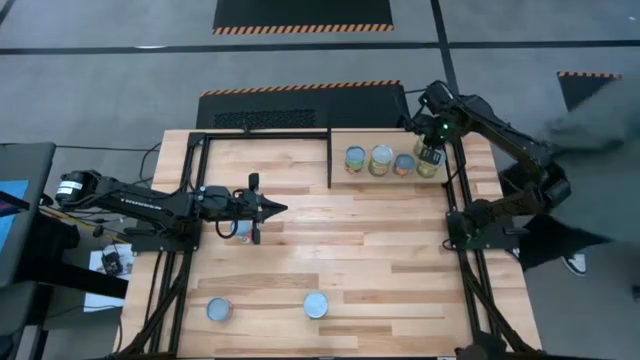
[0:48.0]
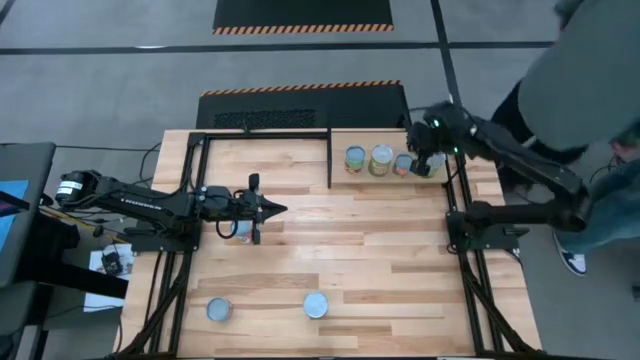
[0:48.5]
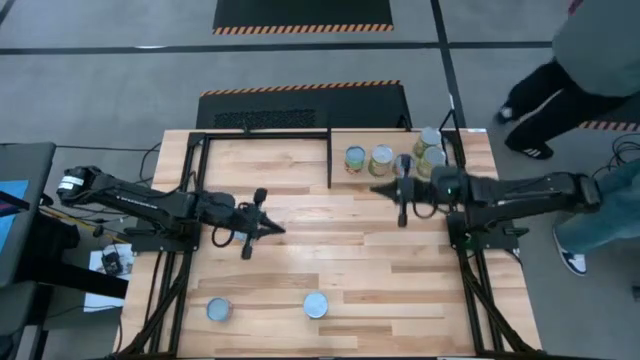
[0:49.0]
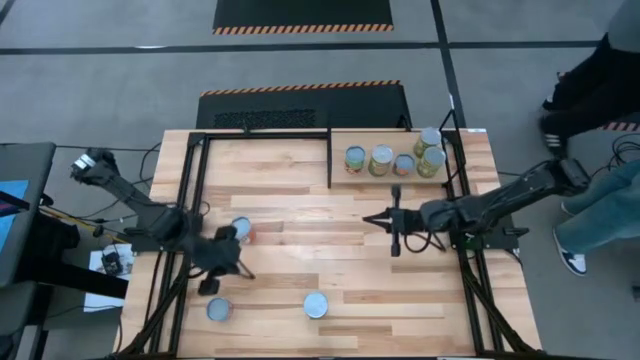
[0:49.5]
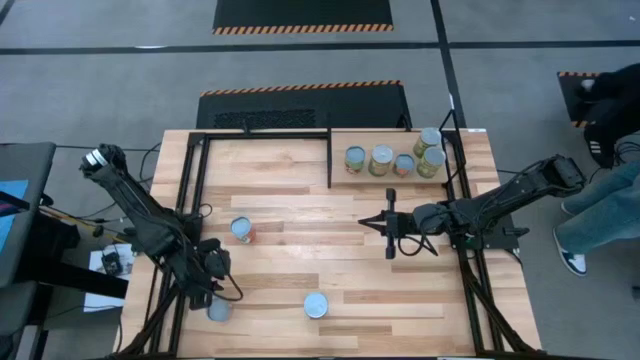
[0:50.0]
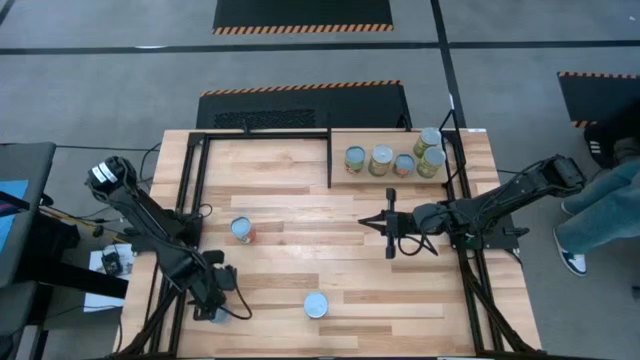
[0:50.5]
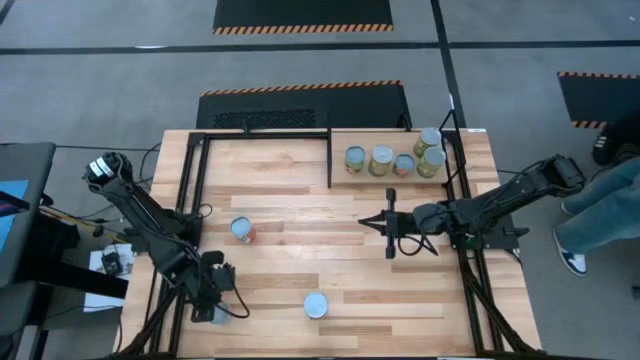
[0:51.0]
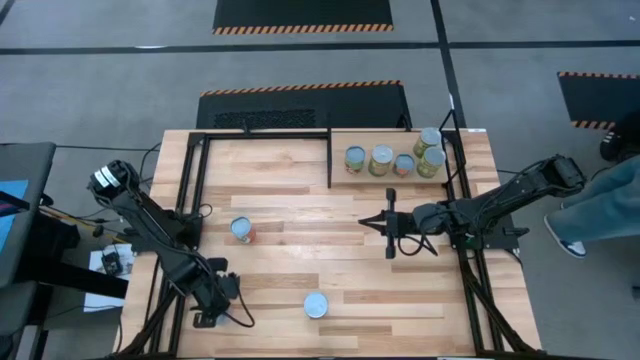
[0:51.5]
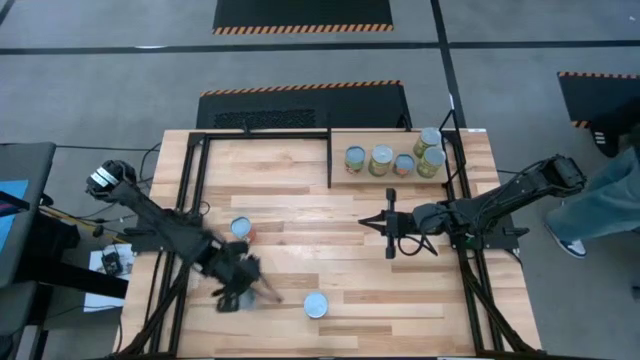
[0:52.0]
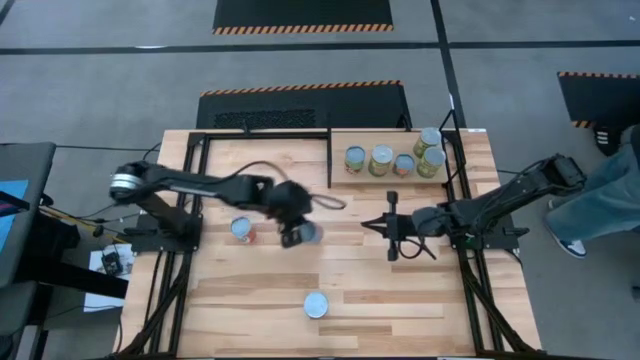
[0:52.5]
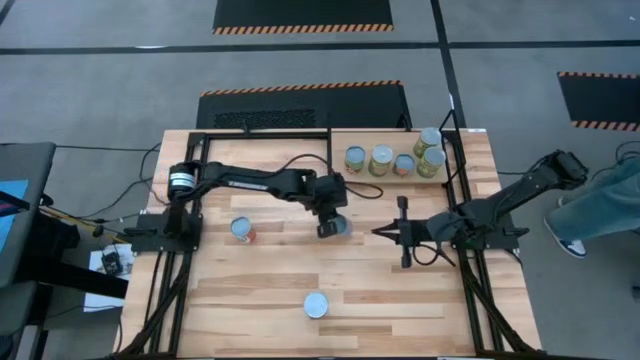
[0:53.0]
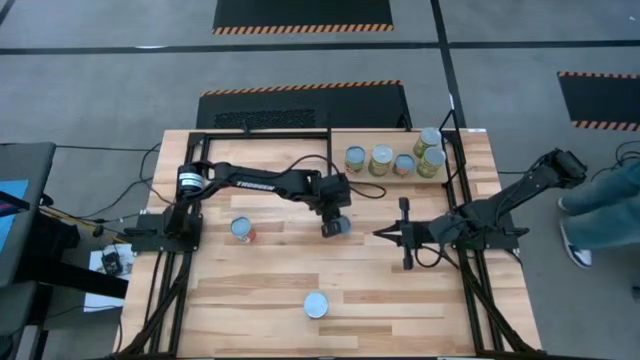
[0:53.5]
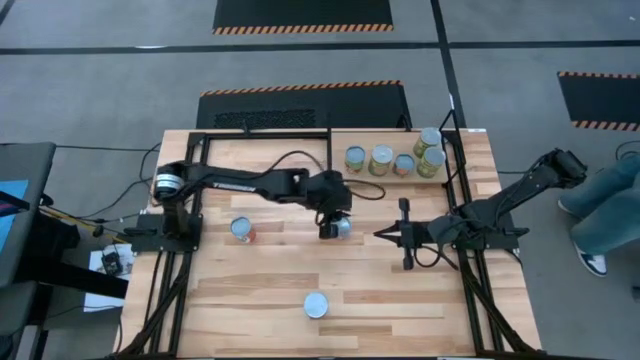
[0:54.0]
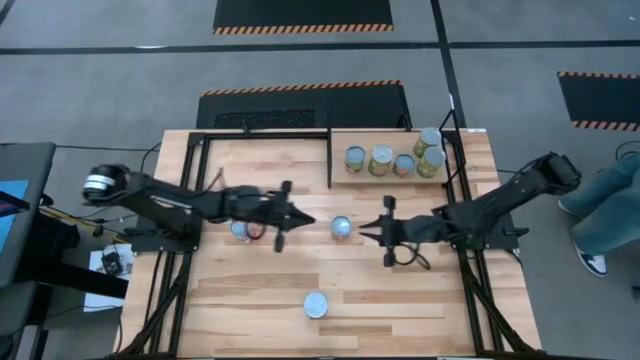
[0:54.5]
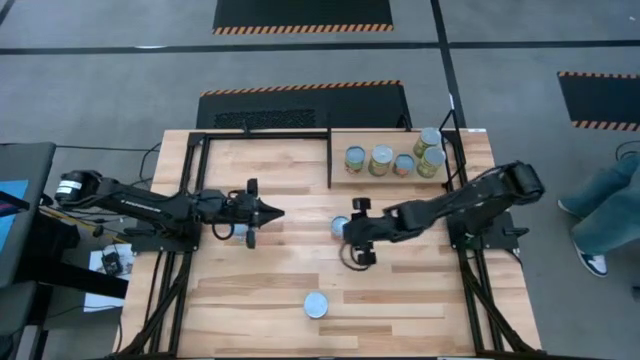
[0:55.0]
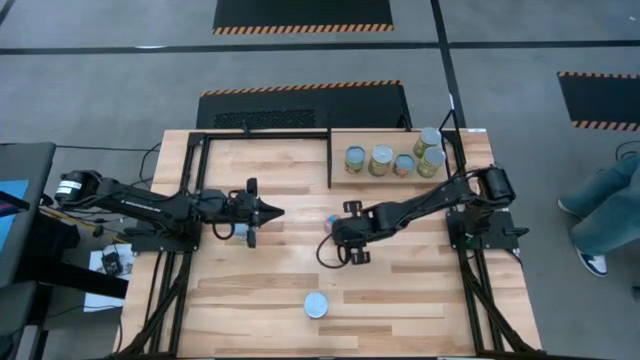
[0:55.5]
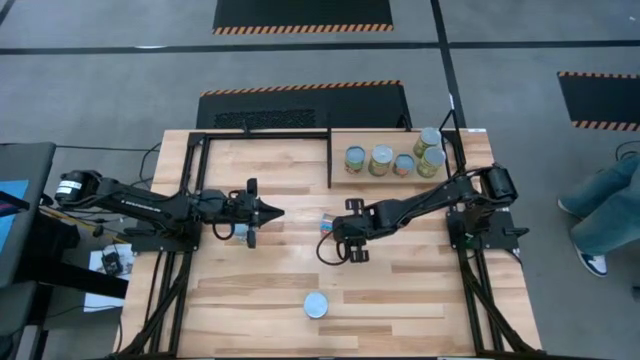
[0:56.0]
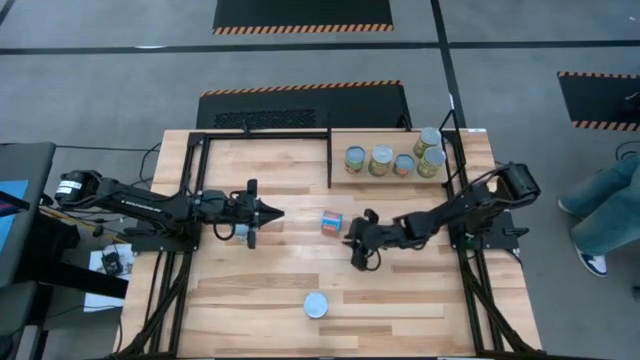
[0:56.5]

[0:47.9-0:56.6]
Task: Pick and place cans onto a shelf
Put the canned corn on the shelf

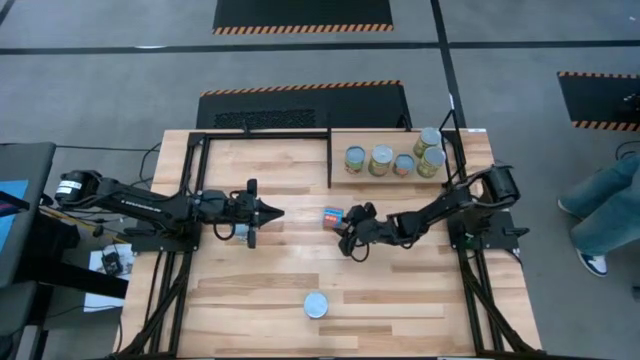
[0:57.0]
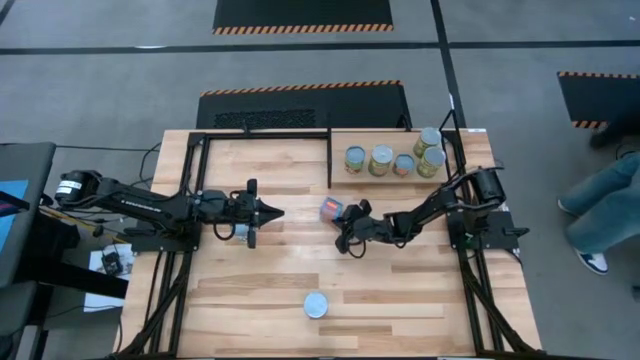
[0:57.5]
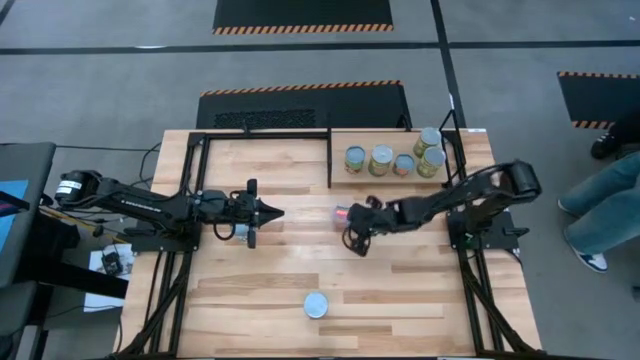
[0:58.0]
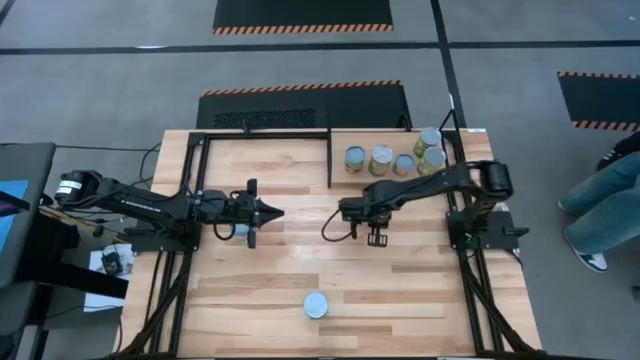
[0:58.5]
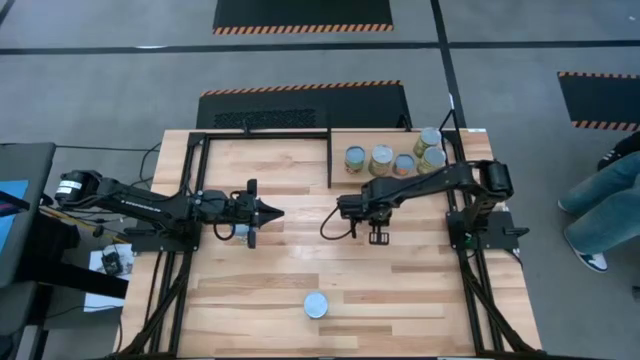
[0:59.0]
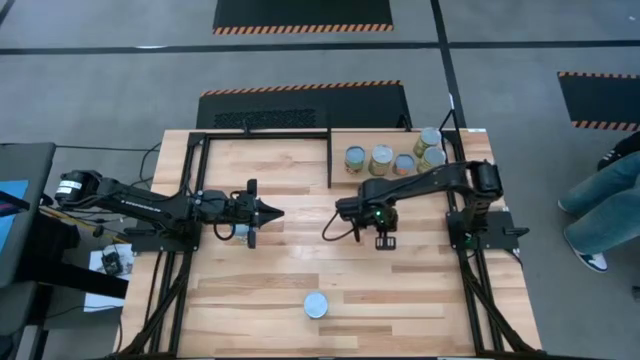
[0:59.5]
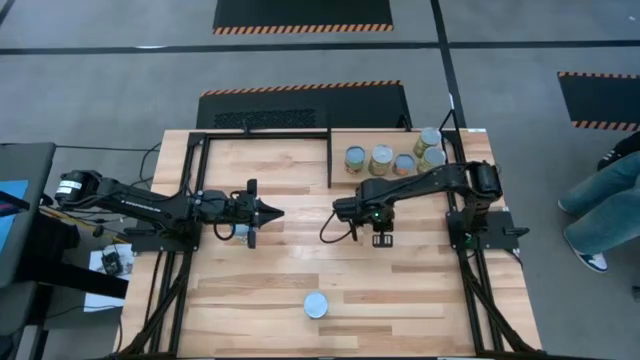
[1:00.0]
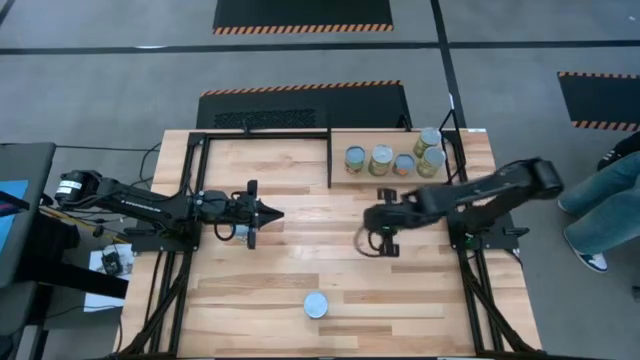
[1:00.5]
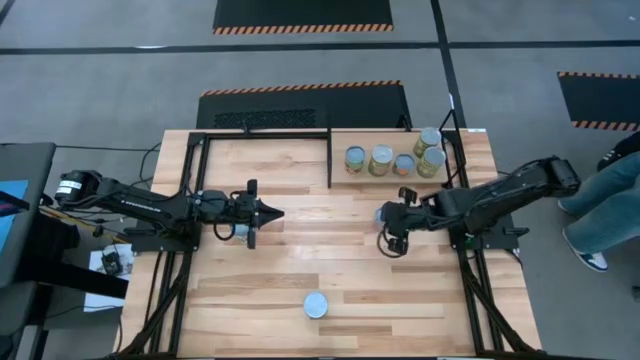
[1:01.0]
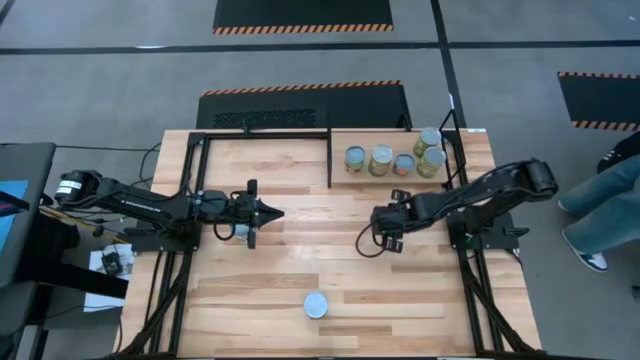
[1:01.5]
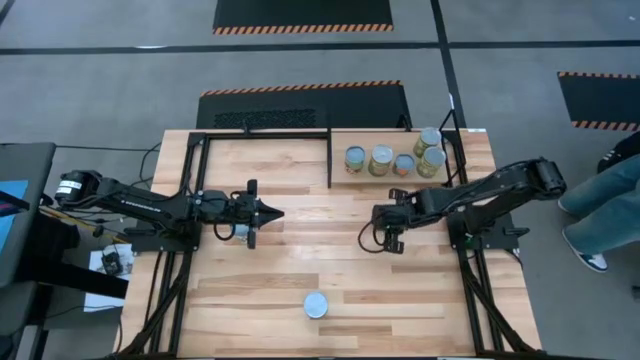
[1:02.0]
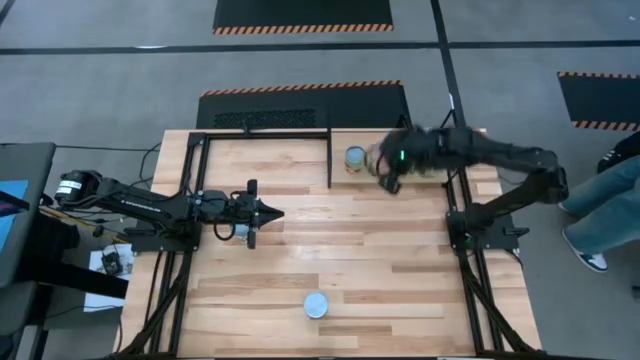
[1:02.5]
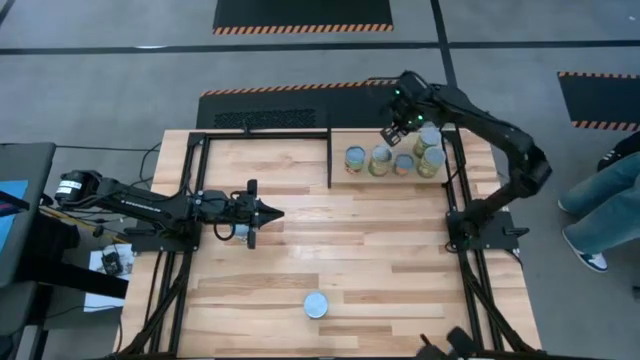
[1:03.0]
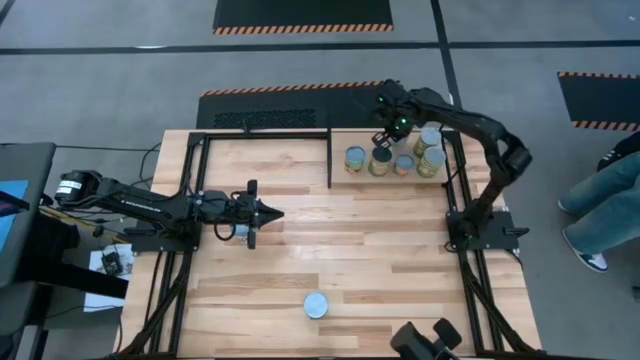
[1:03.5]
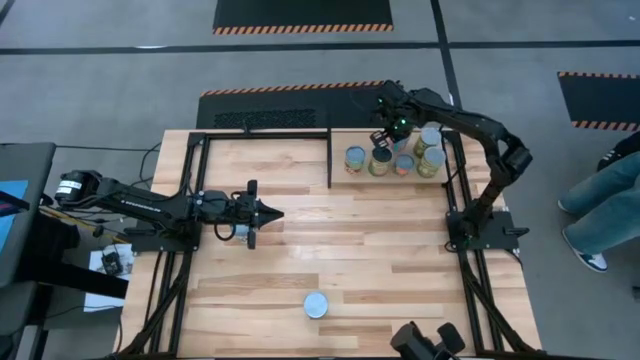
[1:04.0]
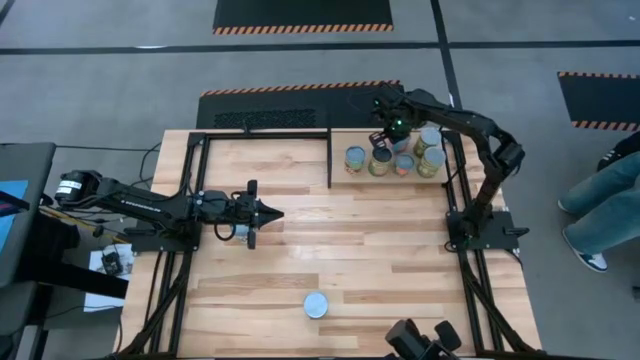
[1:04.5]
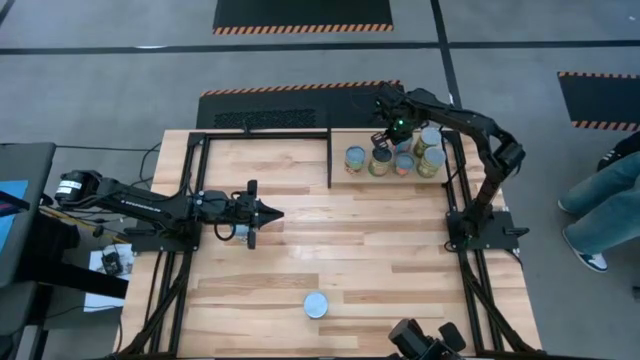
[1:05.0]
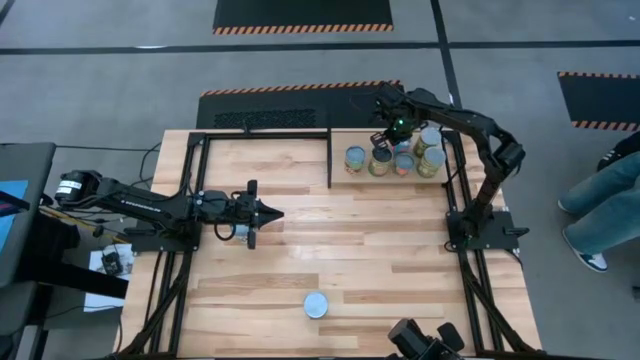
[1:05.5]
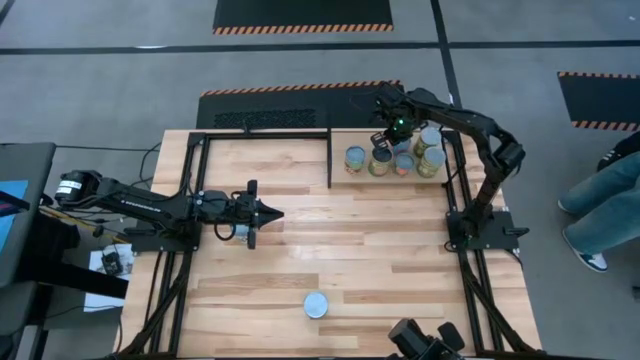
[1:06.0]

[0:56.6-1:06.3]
Put the canned corn on the shelf

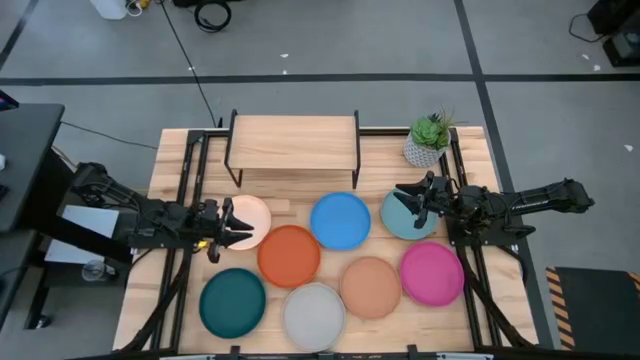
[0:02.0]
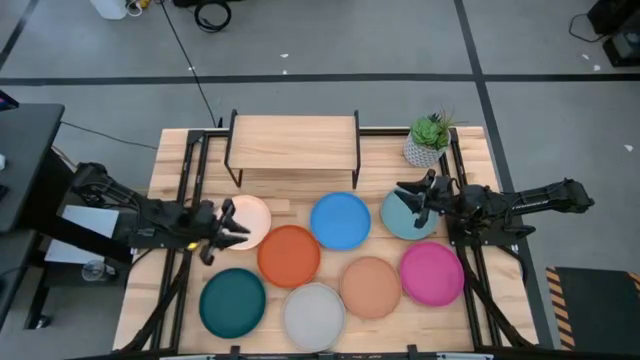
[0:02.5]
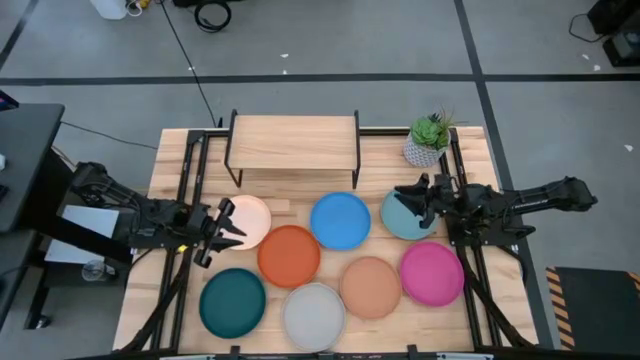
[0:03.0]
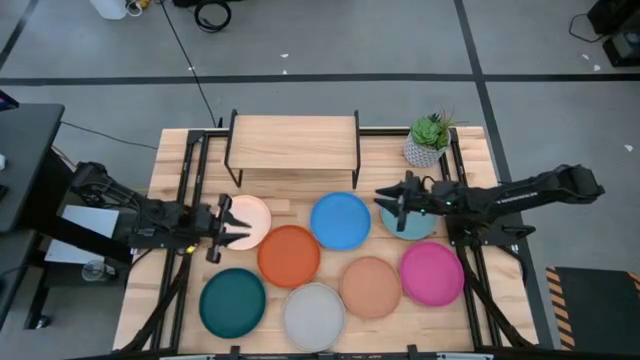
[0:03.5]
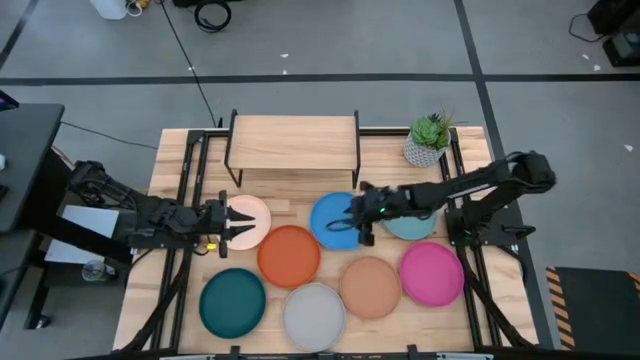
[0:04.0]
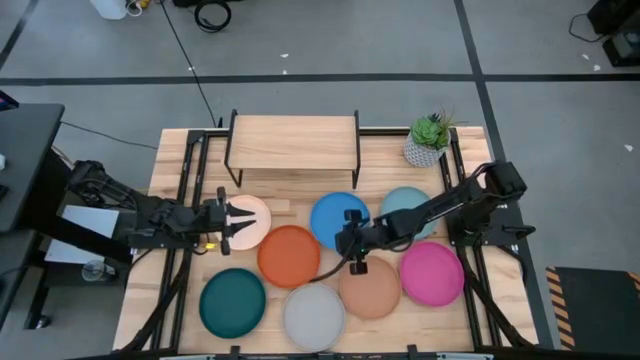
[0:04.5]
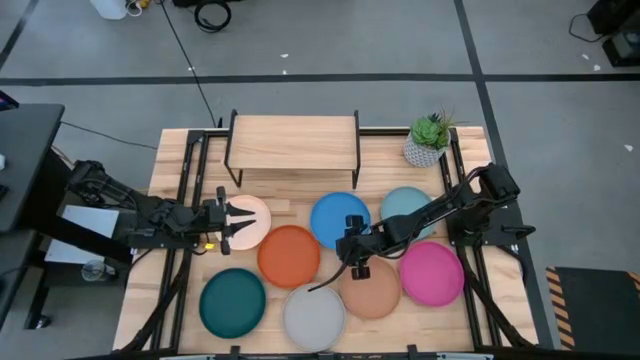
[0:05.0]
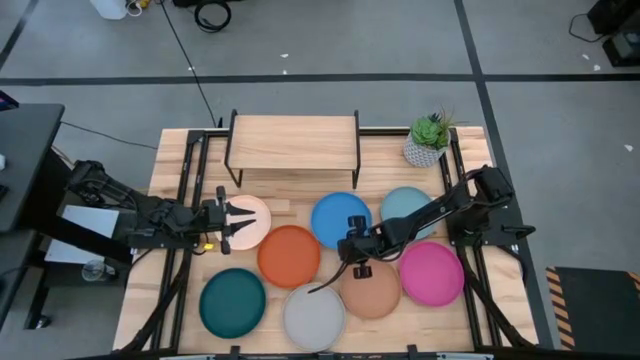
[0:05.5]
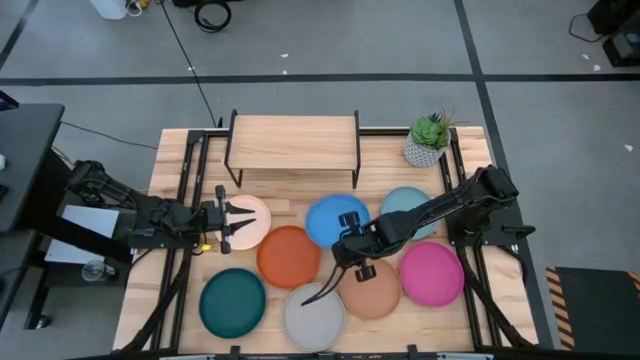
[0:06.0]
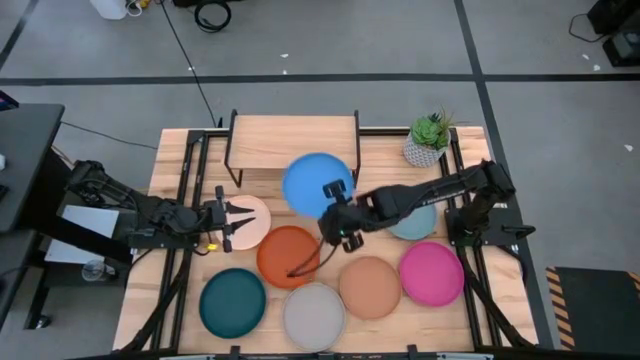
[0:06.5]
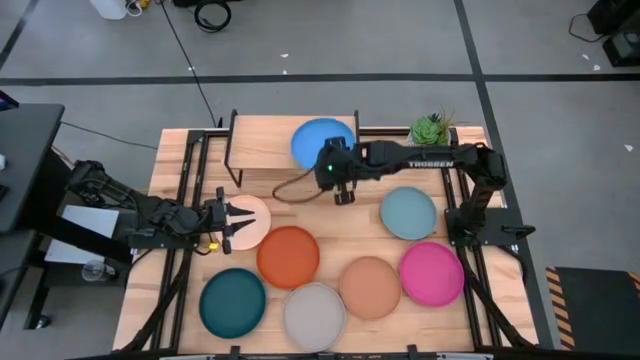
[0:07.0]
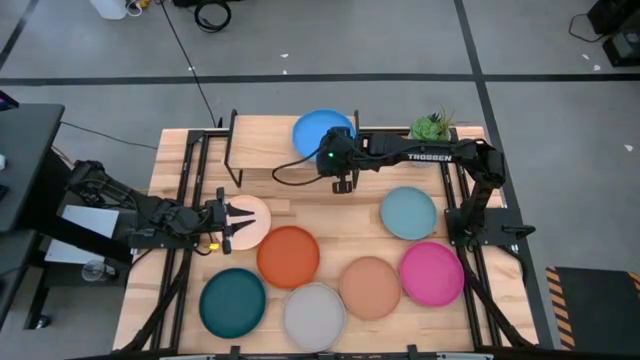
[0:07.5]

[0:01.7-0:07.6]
Task: Place and stack plates onto a shelf
Put the blue plate on the shelf
